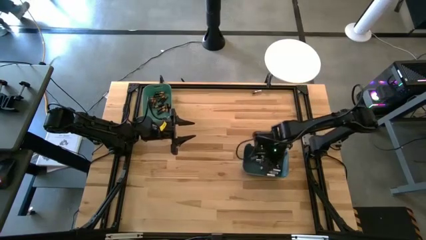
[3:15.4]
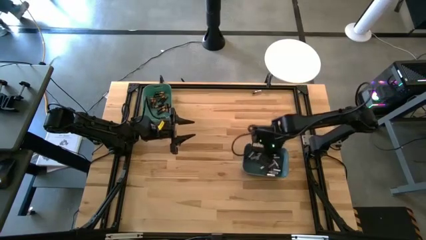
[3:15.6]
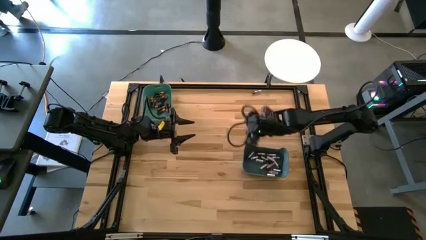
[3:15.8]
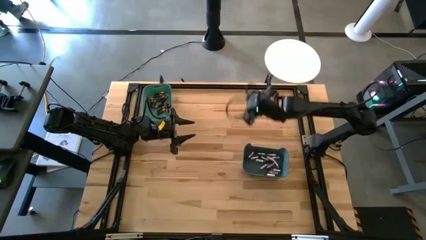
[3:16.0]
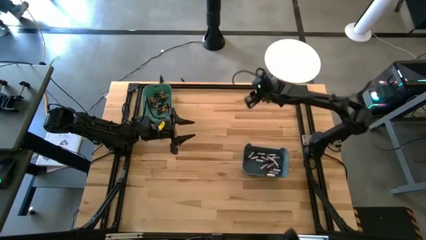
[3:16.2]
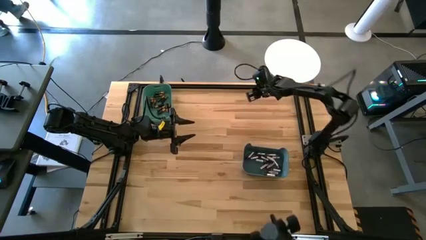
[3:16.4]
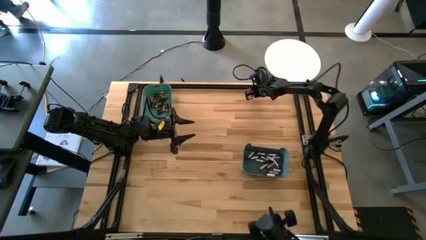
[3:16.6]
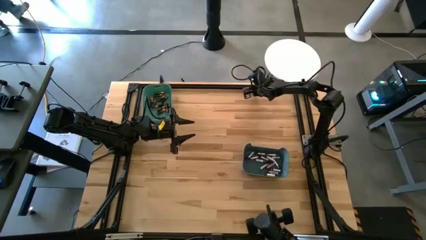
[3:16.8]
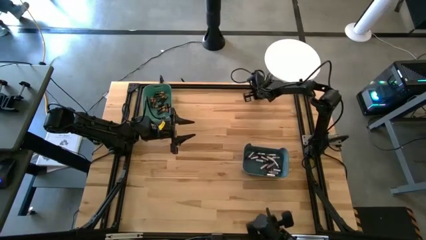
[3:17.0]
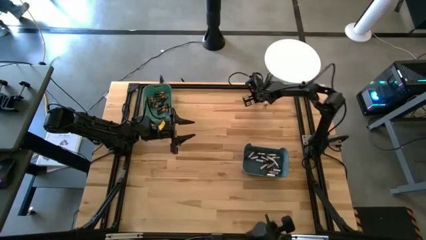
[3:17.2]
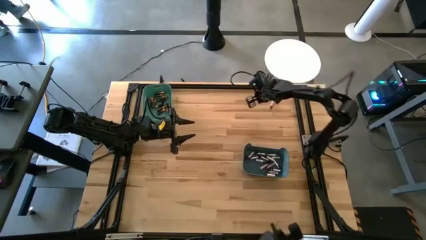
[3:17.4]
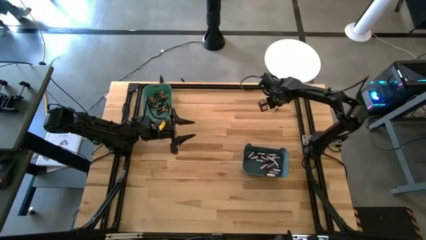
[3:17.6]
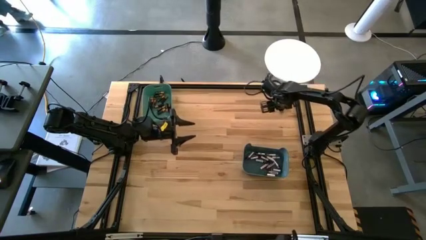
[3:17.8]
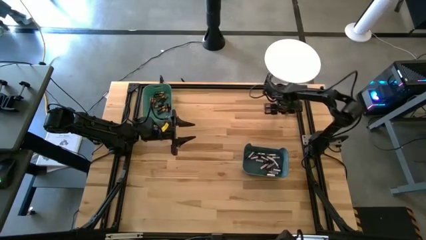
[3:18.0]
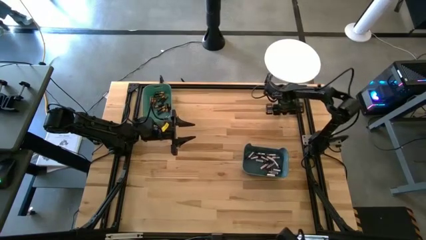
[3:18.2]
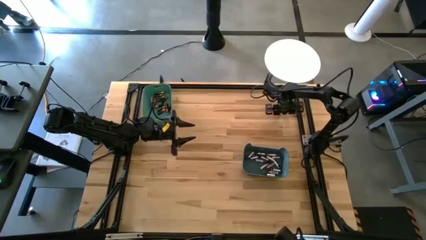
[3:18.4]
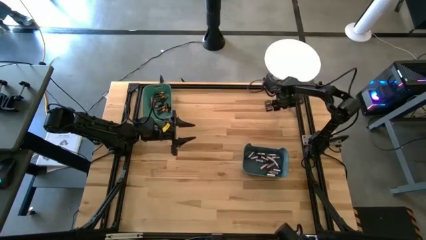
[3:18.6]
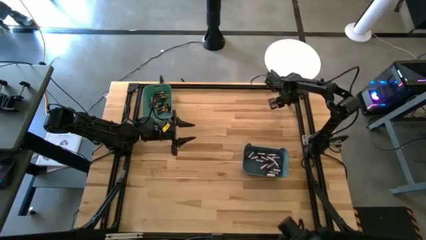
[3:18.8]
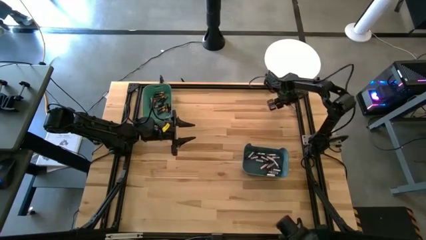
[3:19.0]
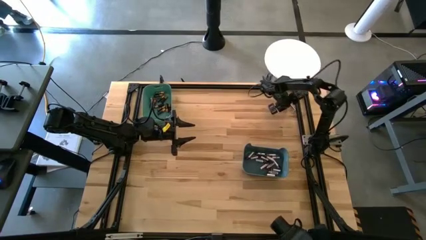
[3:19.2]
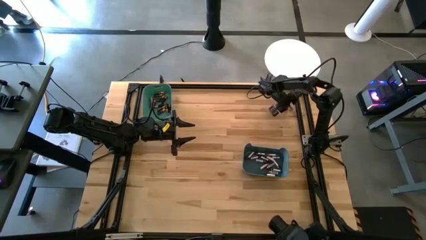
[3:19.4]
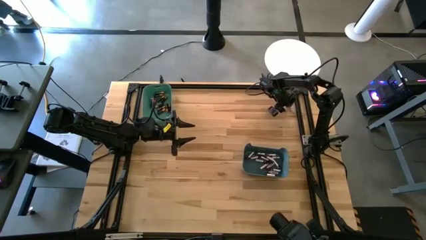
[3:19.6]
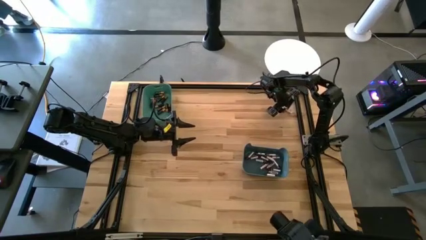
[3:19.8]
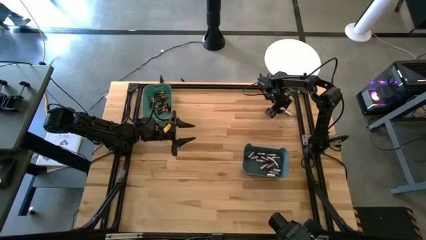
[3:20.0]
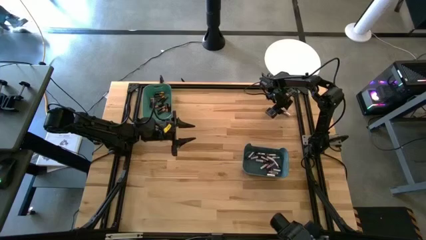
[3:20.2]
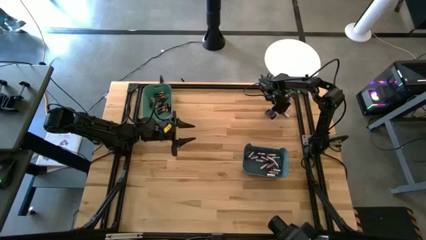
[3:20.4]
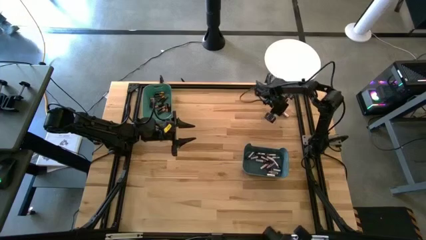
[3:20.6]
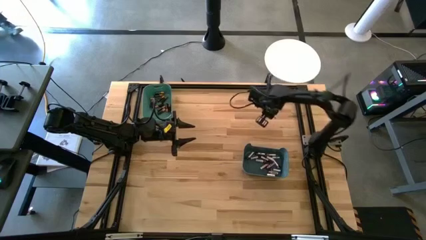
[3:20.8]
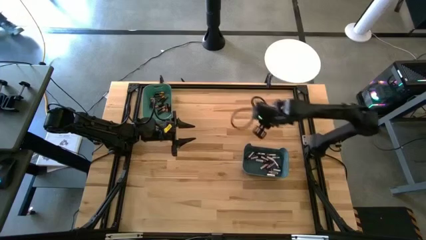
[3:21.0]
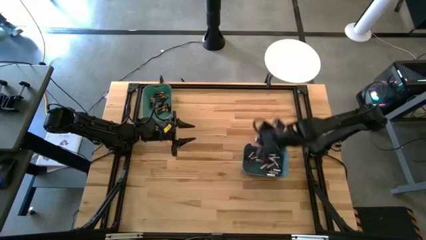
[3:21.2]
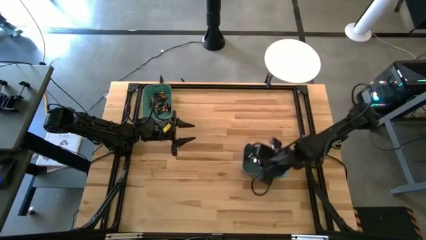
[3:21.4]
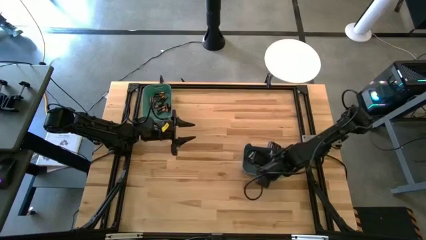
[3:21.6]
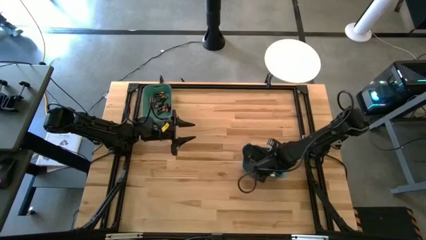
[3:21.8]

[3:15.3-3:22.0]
Task: Sort batteries
Put the silver battery into the blue bin

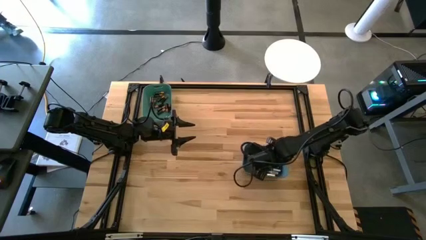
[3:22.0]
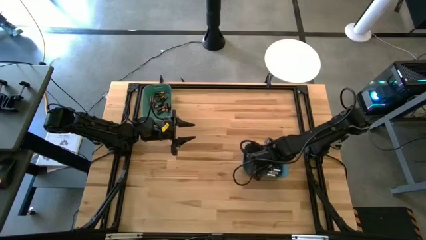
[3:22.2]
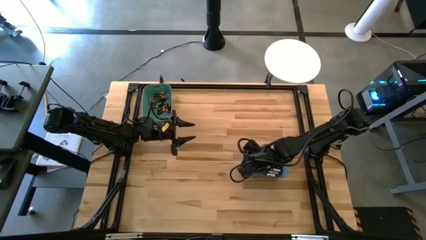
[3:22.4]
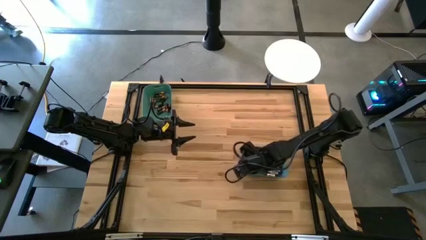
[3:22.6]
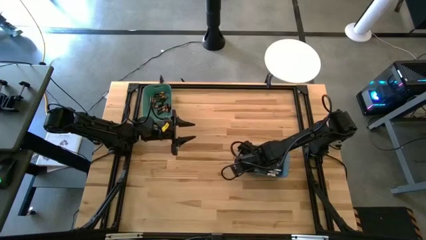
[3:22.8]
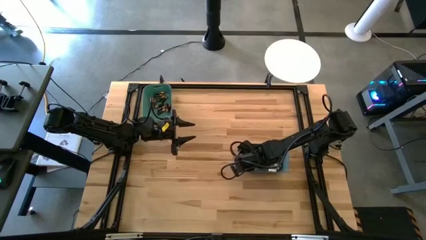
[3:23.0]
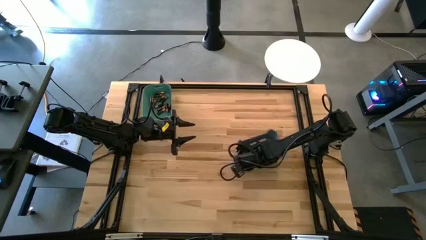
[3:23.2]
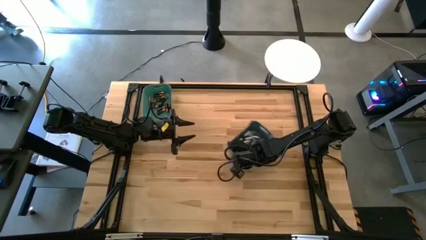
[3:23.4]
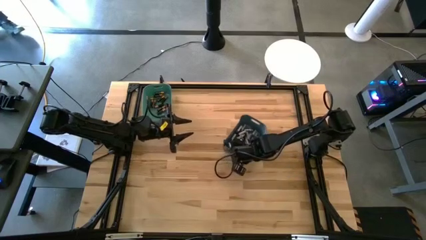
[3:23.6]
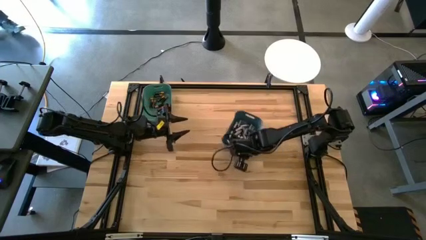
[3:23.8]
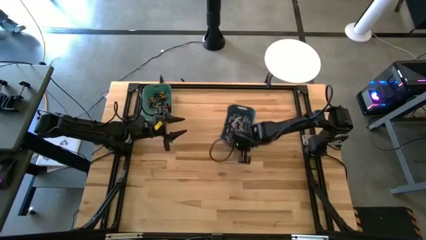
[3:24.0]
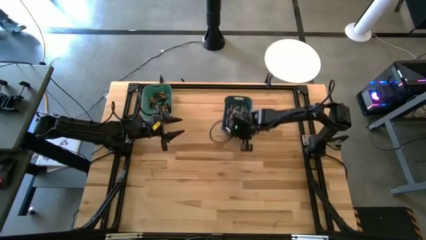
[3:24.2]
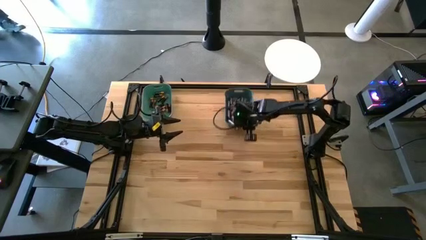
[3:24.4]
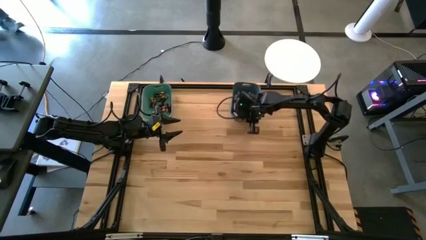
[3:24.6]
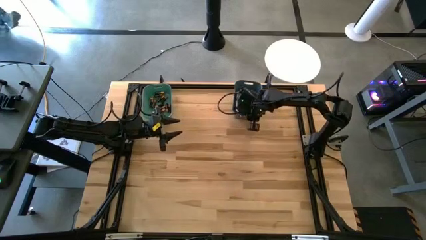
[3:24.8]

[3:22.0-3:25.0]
Move the green bin to the upper right of the table

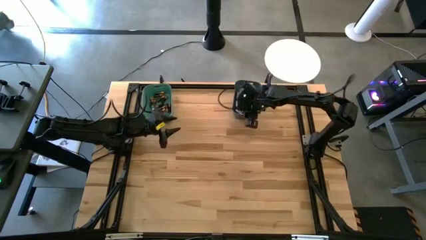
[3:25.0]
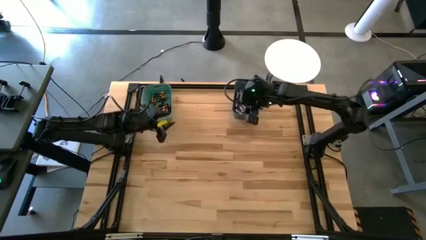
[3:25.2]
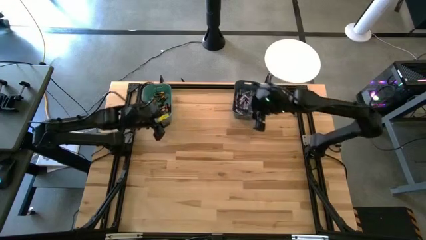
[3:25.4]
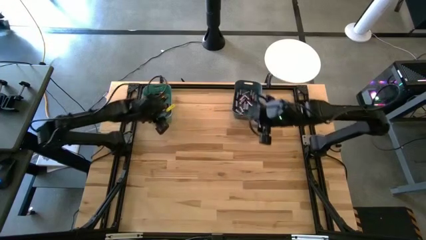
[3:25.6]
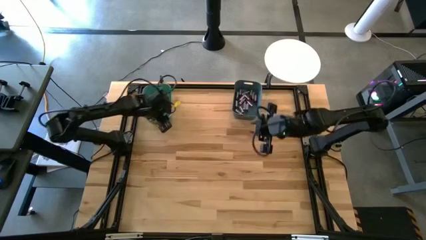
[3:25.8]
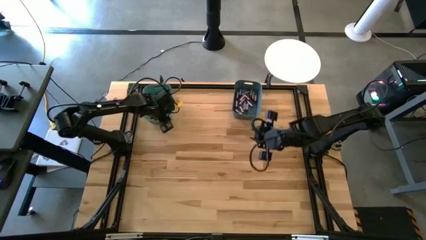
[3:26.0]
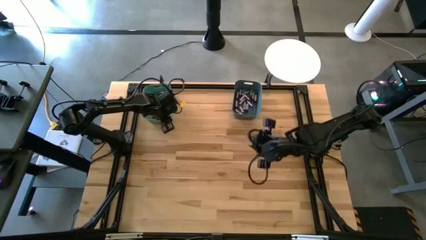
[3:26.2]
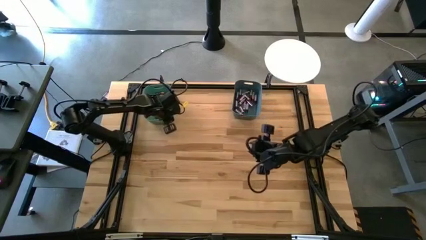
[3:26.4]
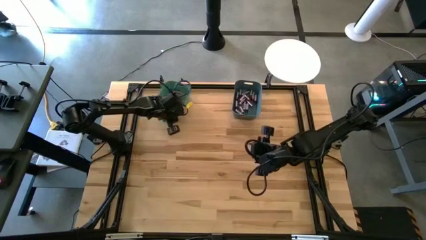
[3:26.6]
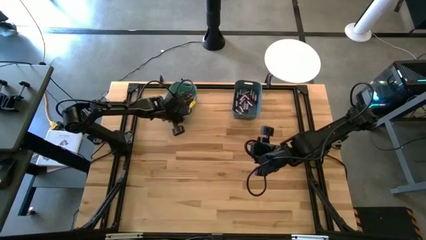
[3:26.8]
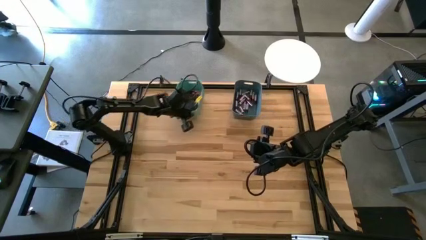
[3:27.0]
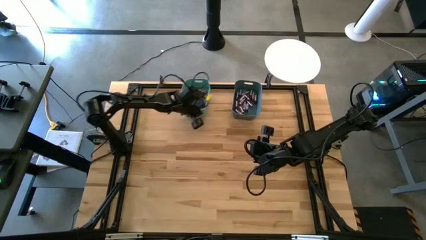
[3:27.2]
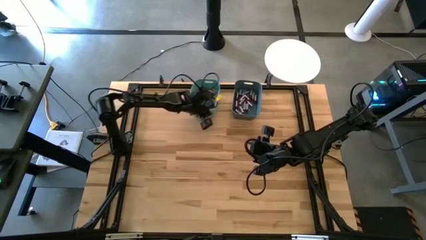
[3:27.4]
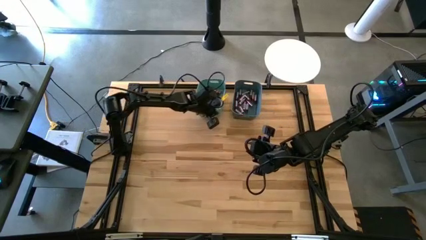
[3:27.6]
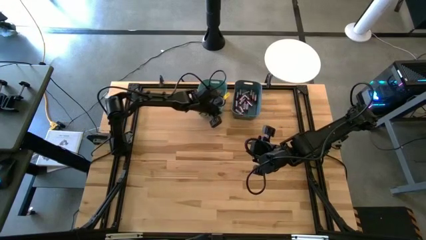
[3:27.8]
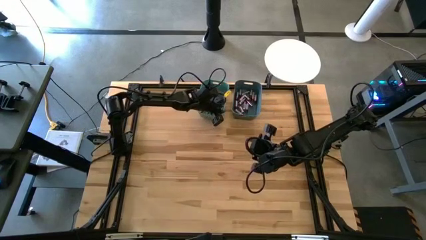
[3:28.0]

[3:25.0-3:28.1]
Move the blue bin to the upper middle of the table

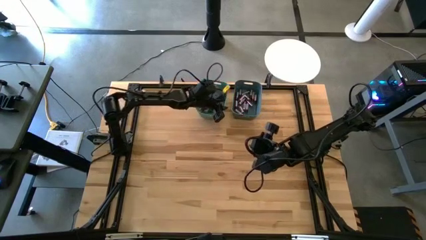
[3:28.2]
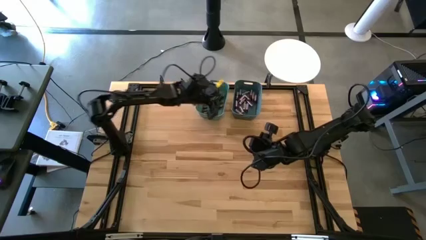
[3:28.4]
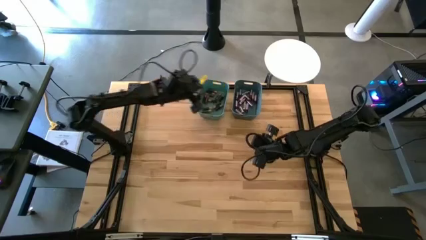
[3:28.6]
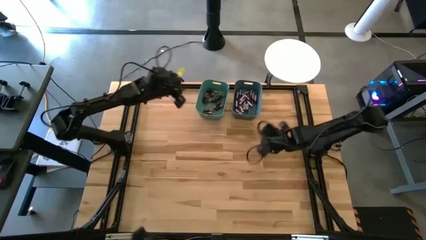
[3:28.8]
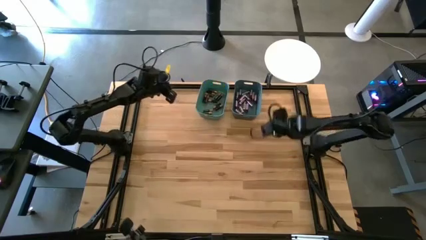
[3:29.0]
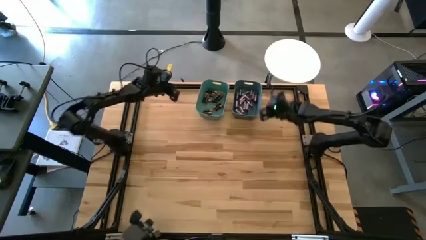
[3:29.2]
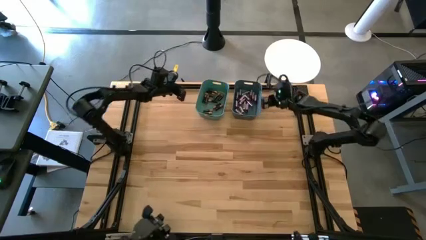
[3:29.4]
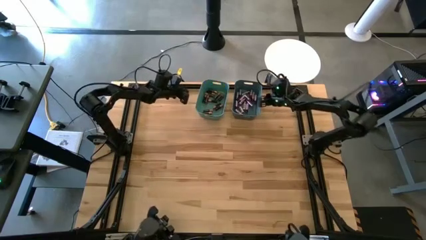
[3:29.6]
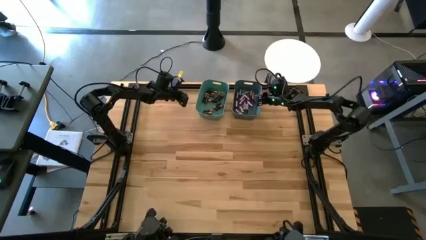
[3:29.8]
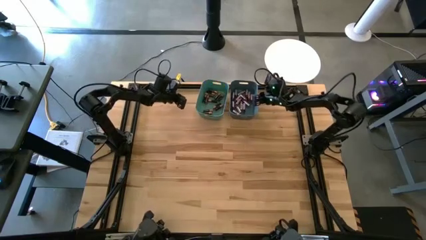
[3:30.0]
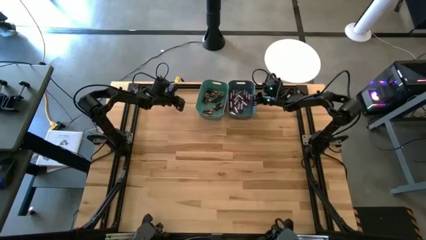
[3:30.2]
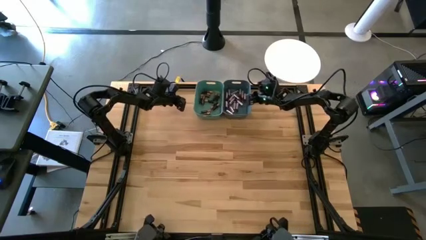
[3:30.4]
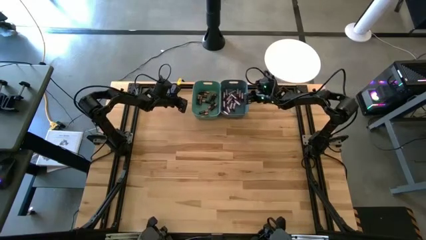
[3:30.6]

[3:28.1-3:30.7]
Adjust the green bin
